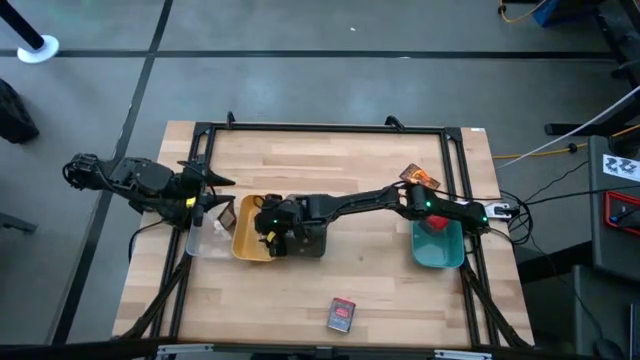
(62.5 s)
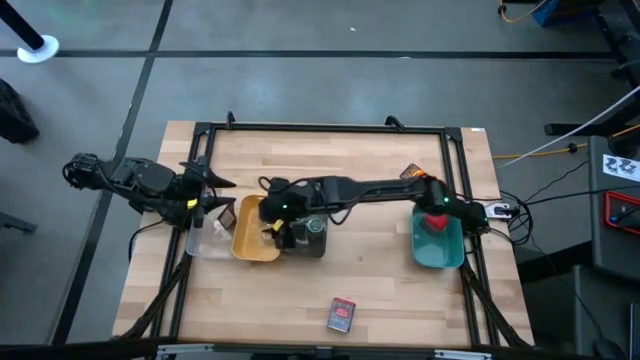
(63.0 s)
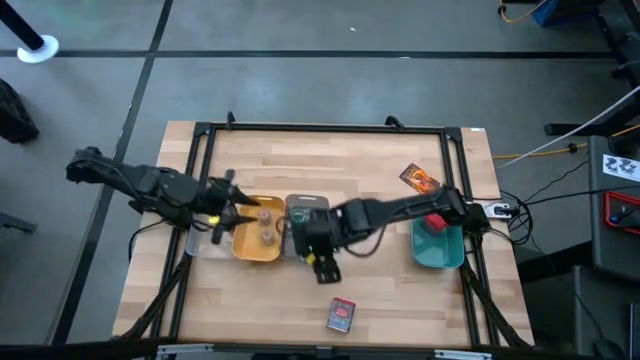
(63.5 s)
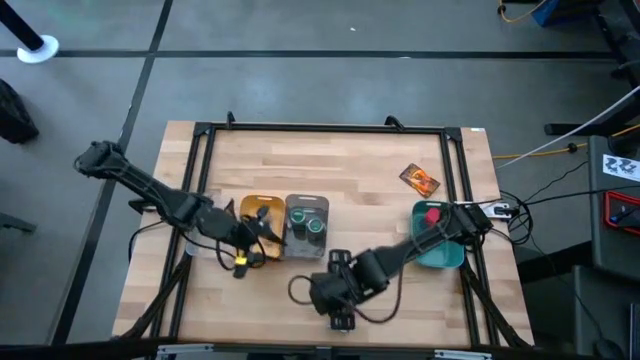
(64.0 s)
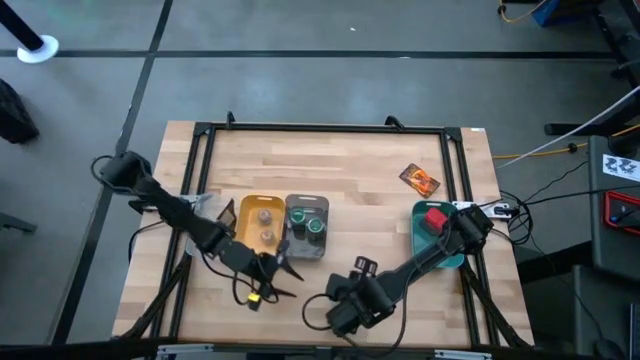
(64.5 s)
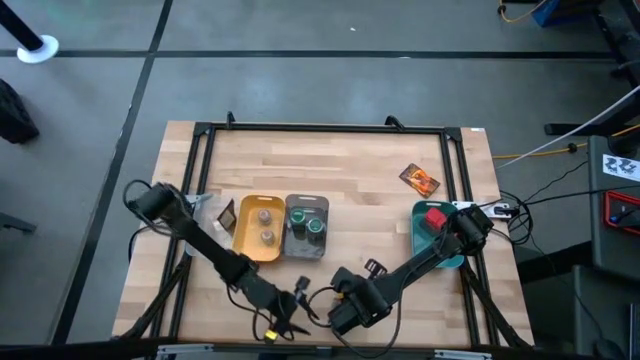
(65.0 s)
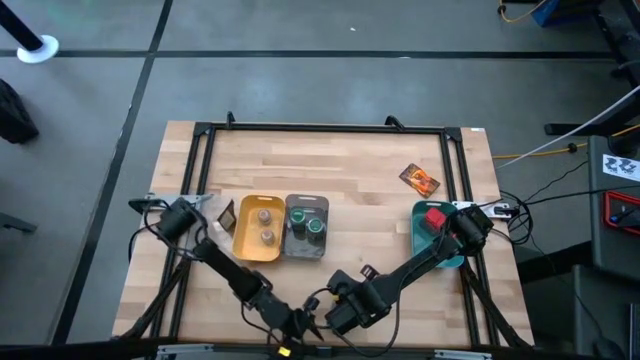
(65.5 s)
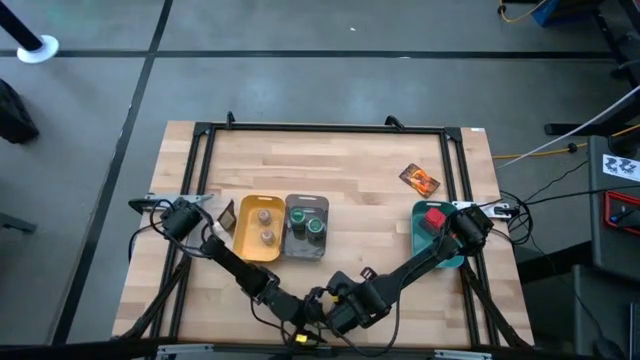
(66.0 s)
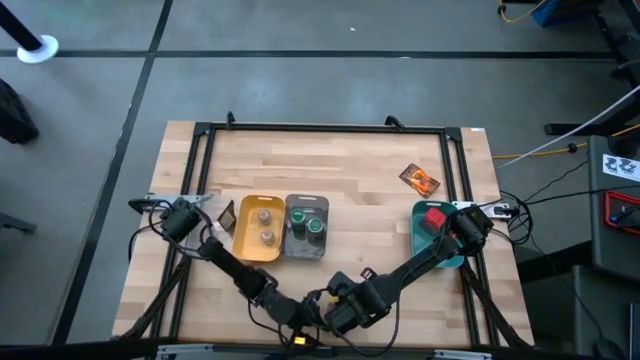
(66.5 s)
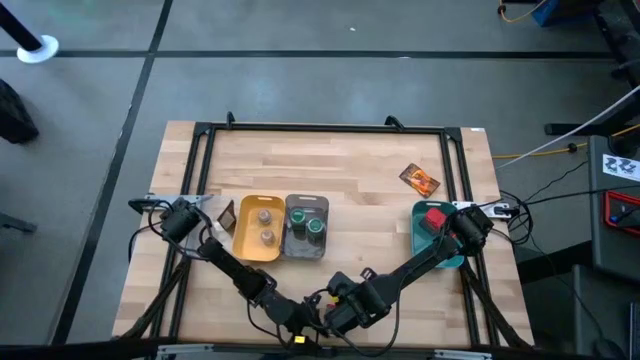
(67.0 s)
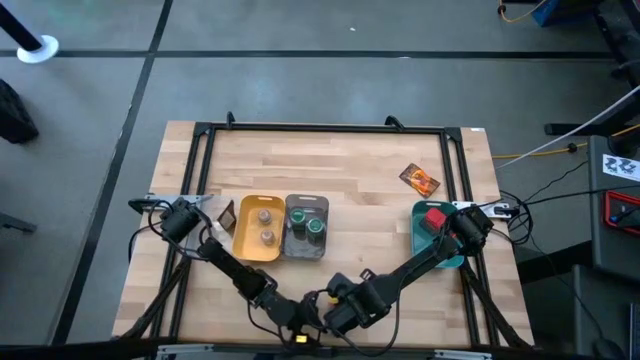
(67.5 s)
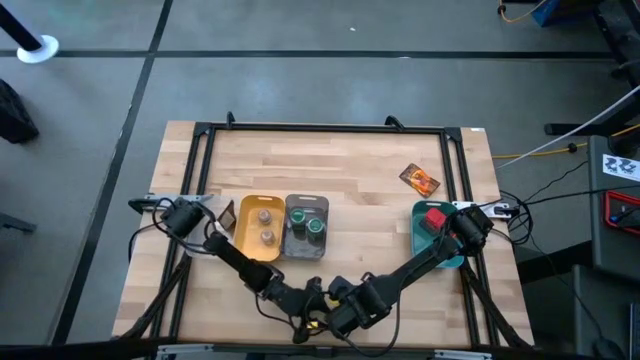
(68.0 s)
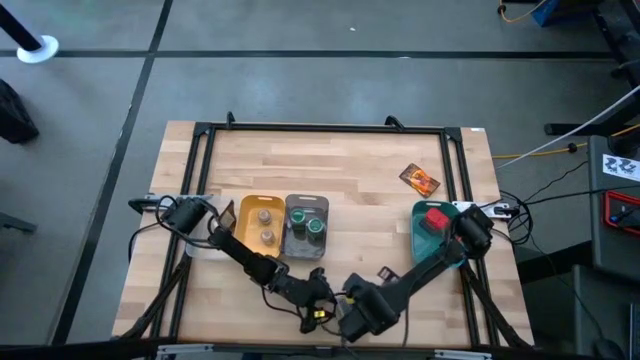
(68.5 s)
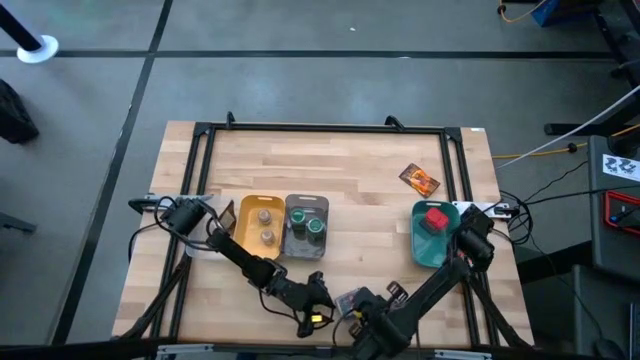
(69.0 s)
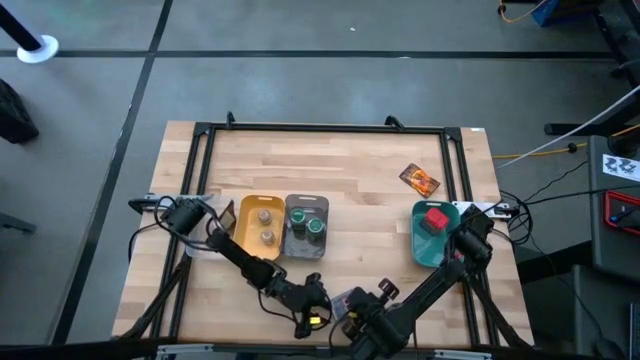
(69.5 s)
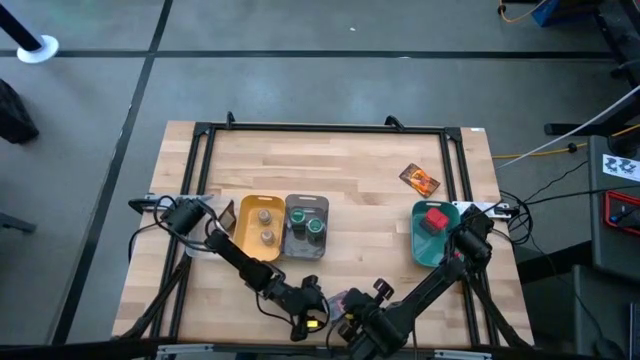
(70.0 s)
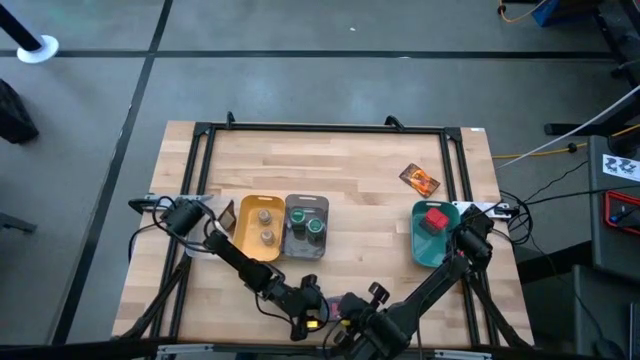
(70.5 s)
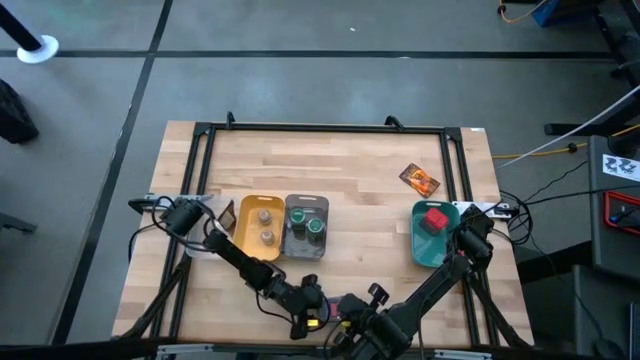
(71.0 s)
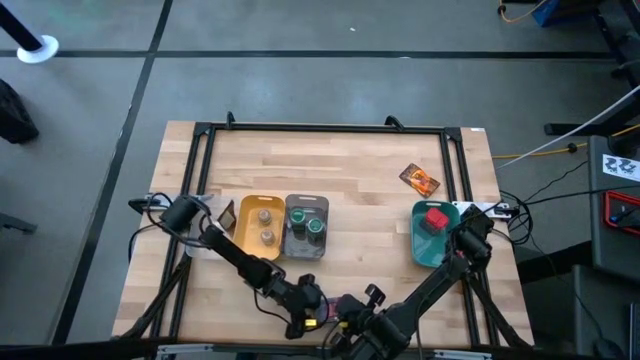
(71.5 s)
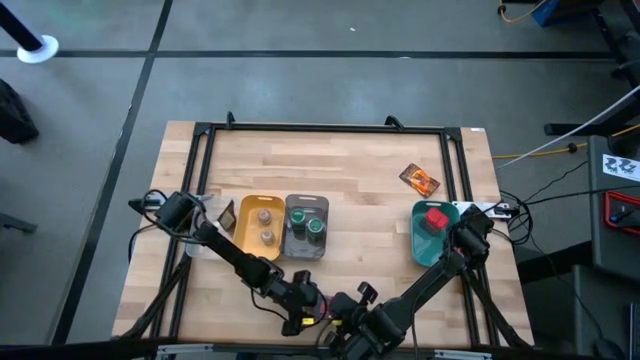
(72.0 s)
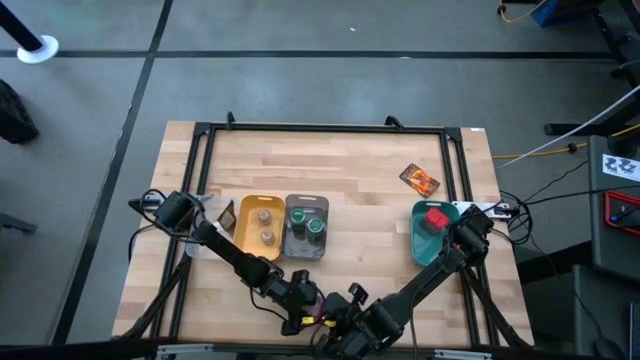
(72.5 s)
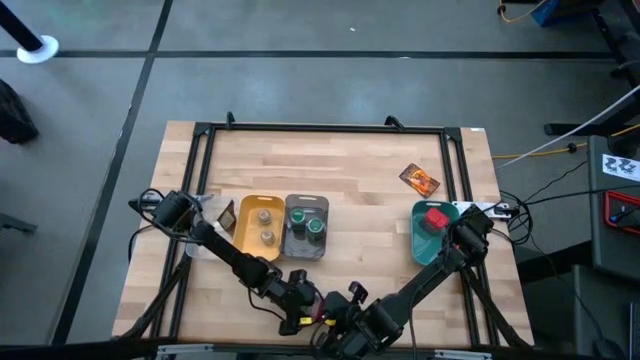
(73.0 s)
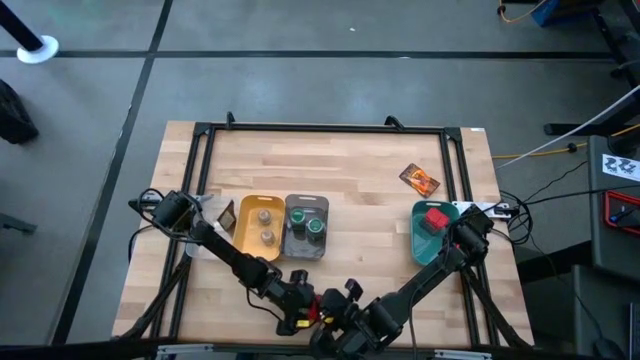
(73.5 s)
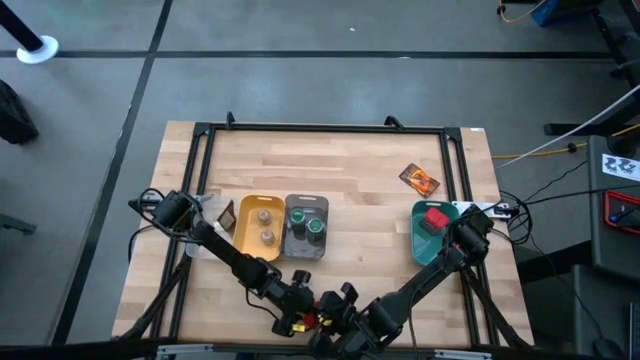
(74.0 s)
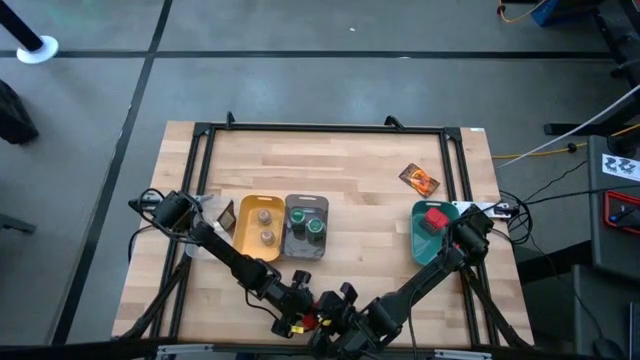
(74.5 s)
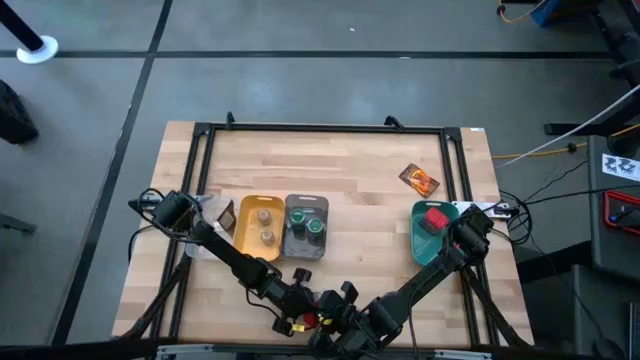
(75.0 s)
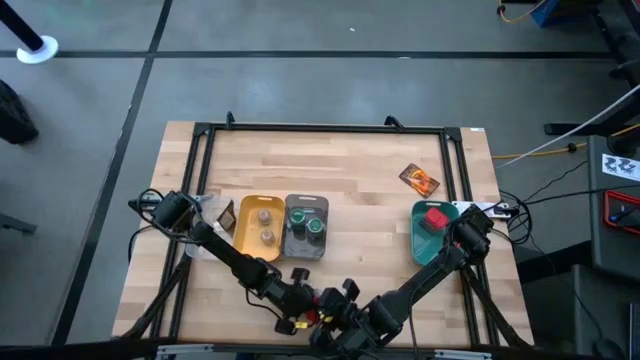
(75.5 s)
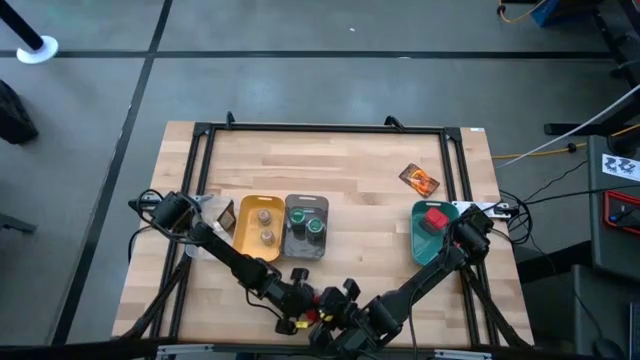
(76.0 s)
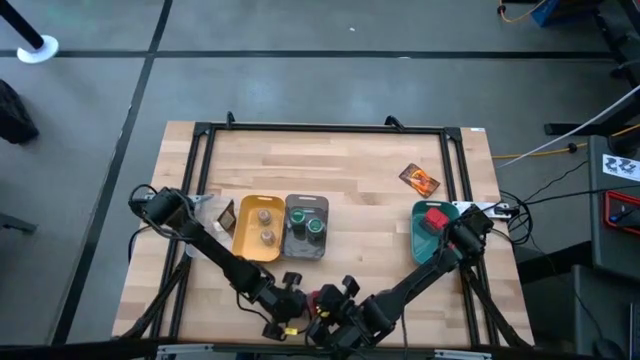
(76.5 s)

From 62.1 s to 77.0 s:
Task: Sort spices by type
Put the red spice can into the green bin

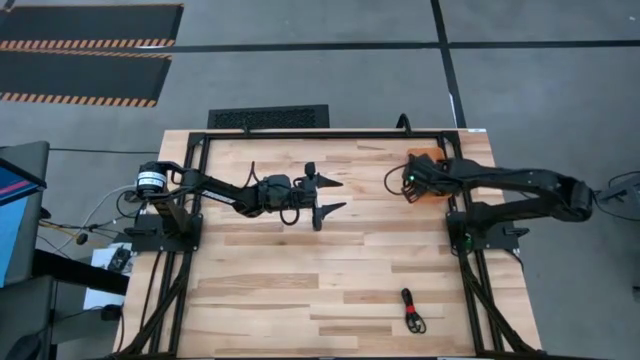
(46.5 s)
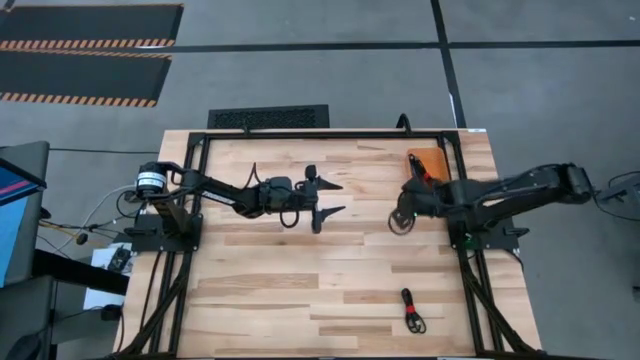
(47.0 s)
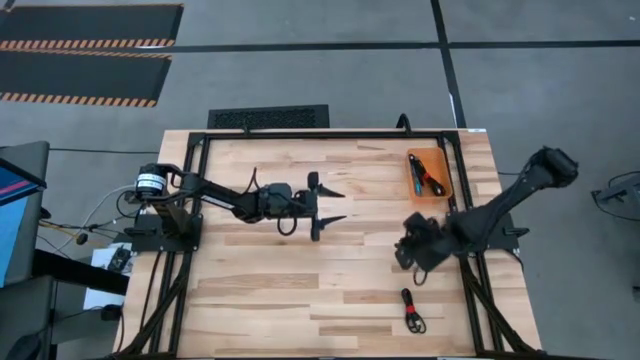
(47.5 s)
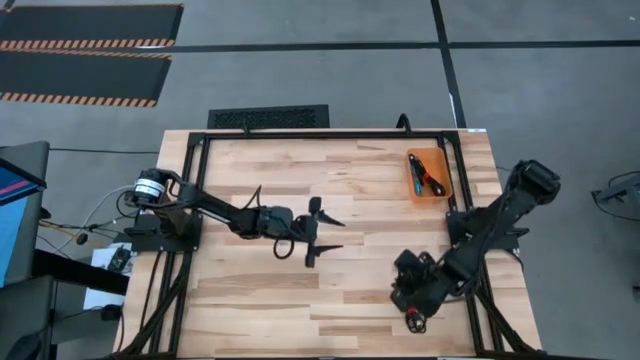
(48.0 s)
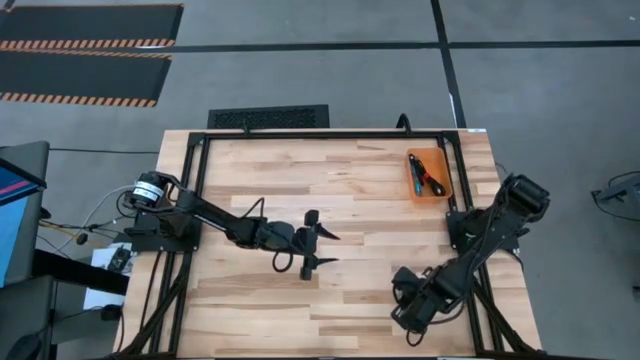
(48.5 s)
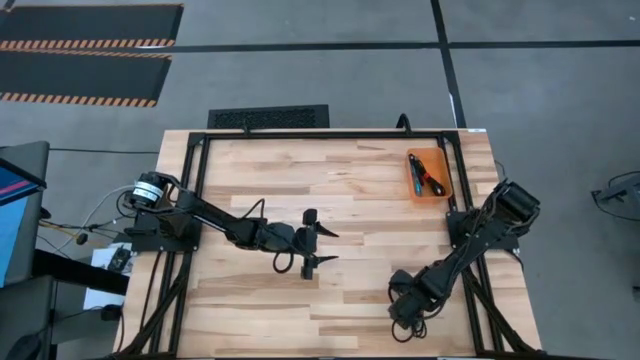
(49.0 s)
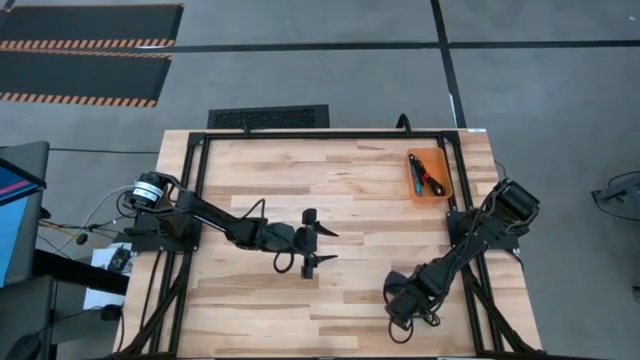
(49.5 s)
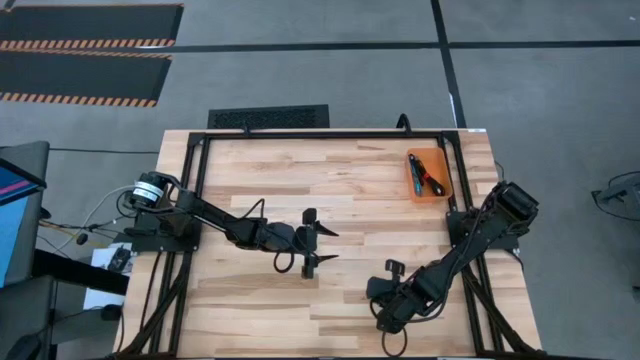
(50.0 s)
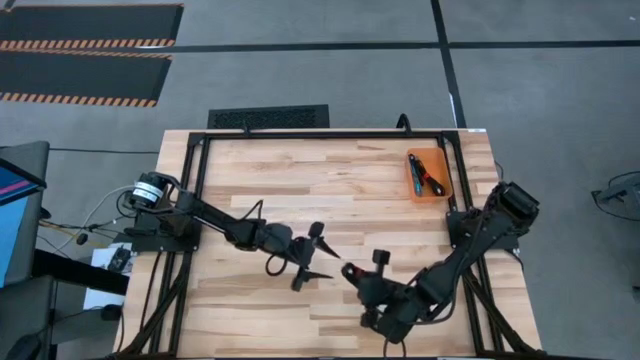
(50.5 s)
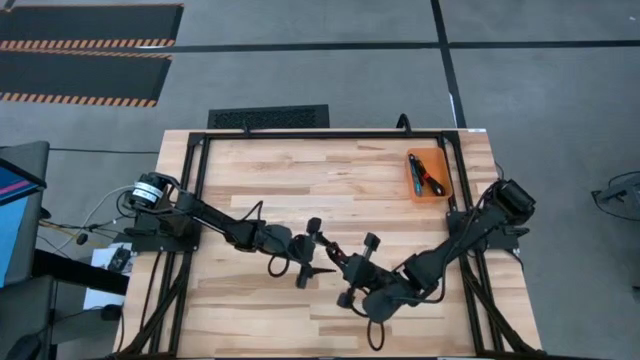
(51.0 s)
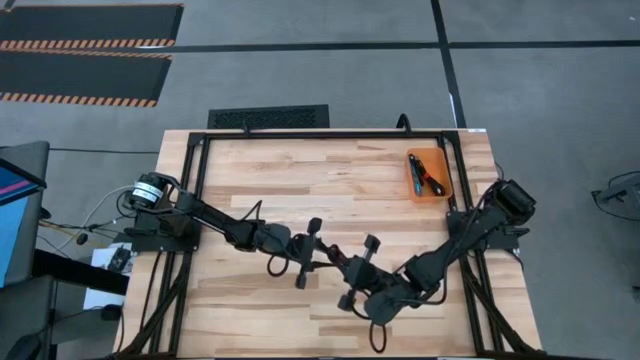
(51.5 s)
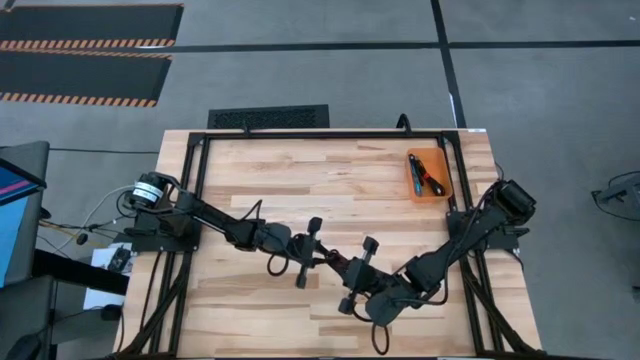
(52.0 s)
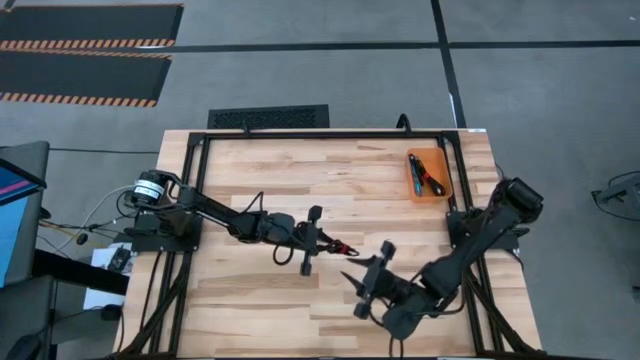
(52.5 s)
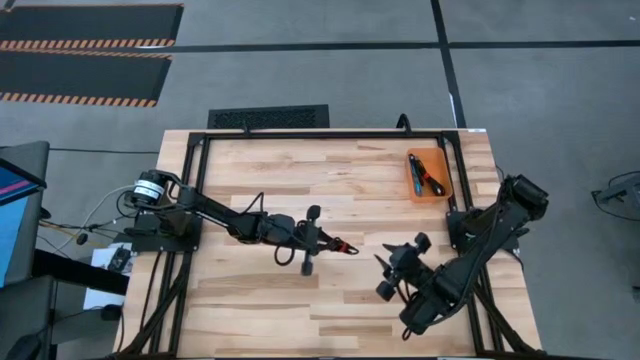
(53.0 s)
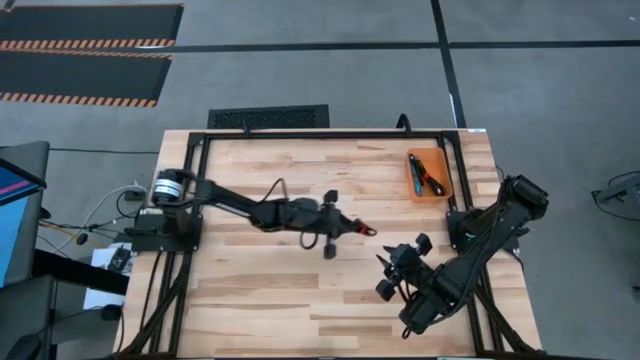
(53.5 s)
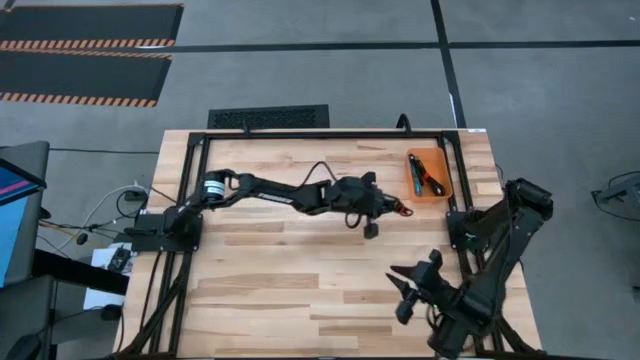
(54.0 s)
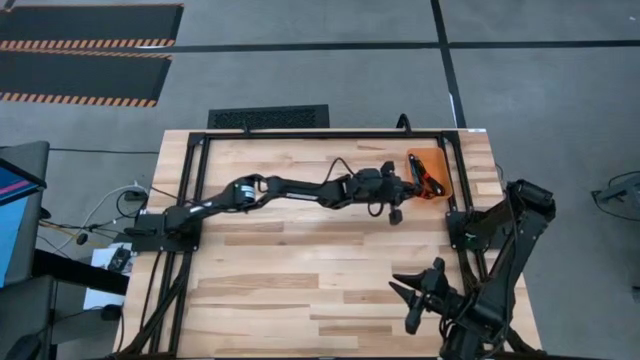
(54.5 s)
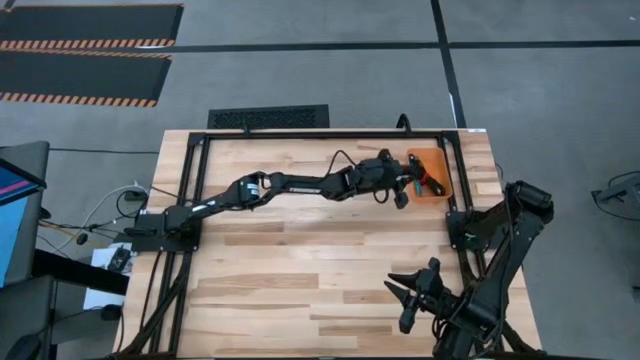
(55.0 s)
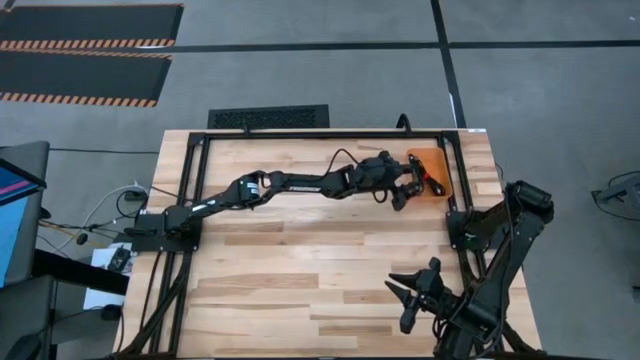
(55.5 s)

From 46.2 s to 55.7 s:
Task: Pick and place USB-C Cables
Put the black charger cable into the orange bin
